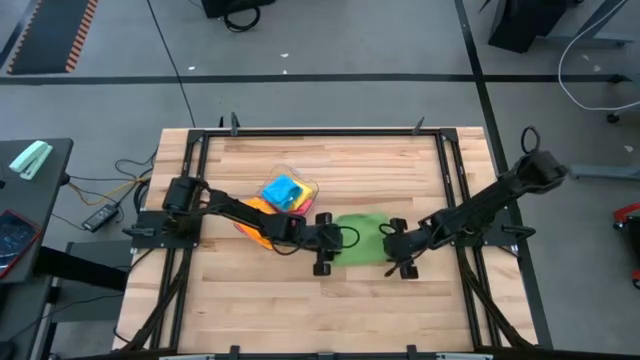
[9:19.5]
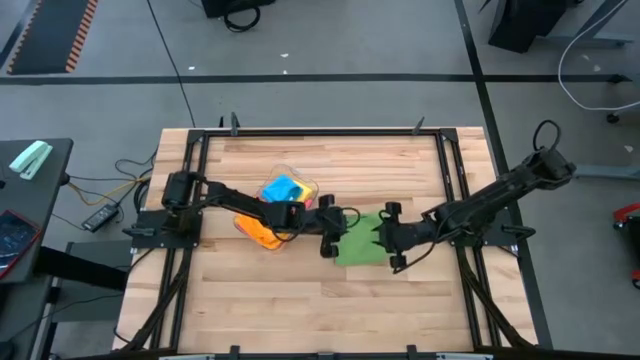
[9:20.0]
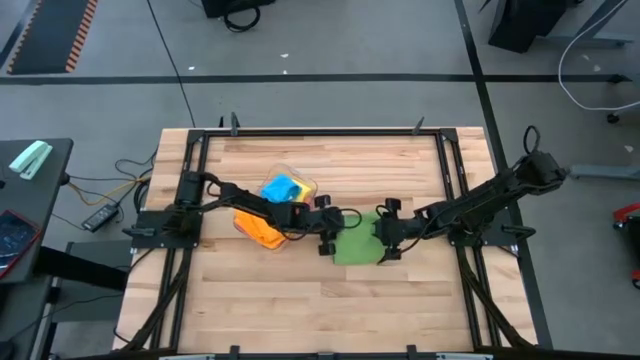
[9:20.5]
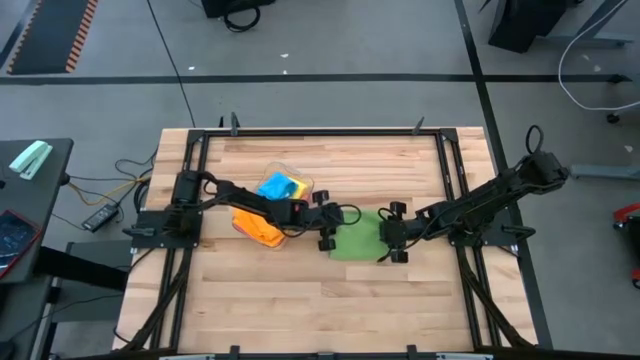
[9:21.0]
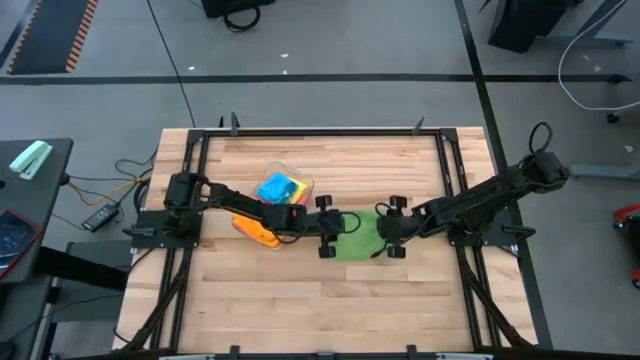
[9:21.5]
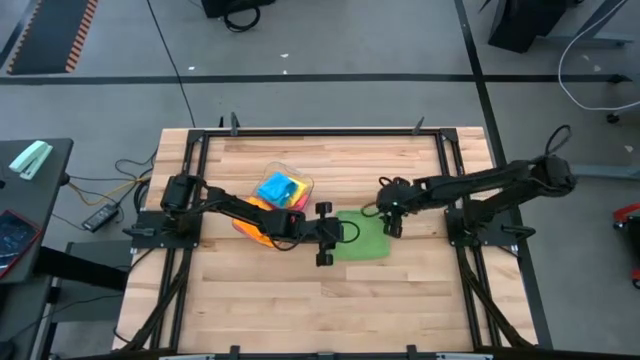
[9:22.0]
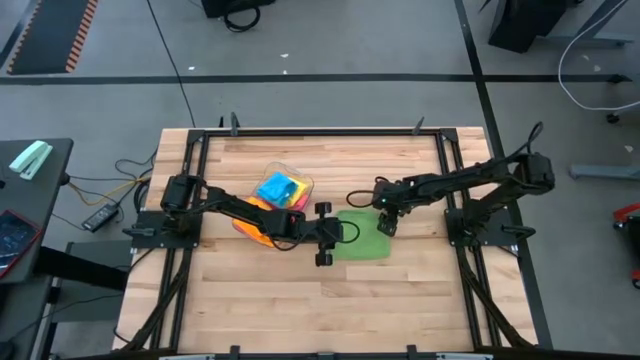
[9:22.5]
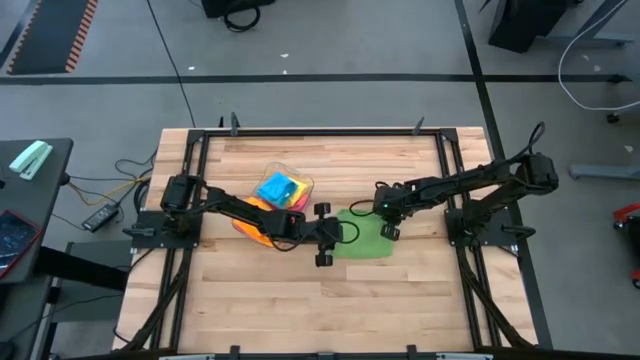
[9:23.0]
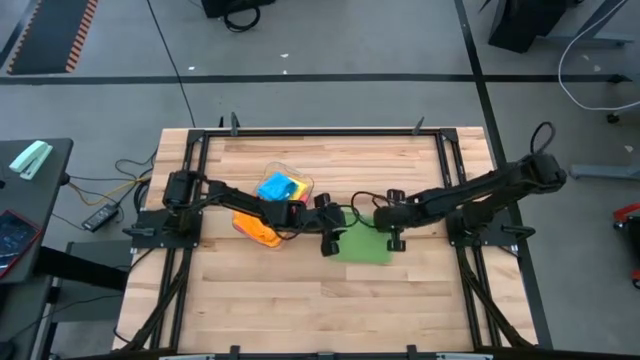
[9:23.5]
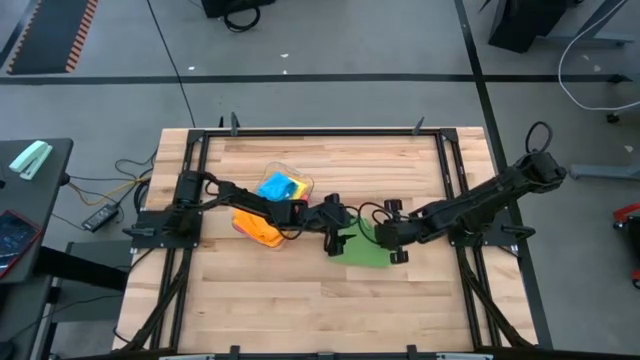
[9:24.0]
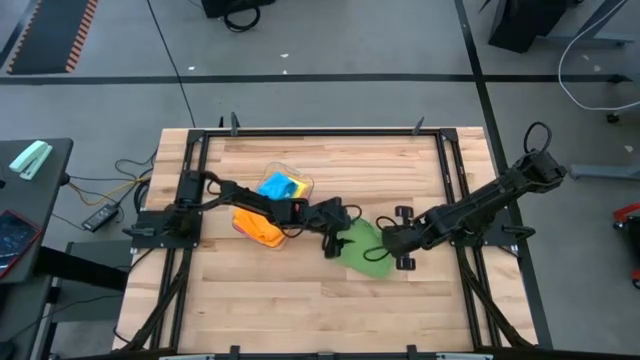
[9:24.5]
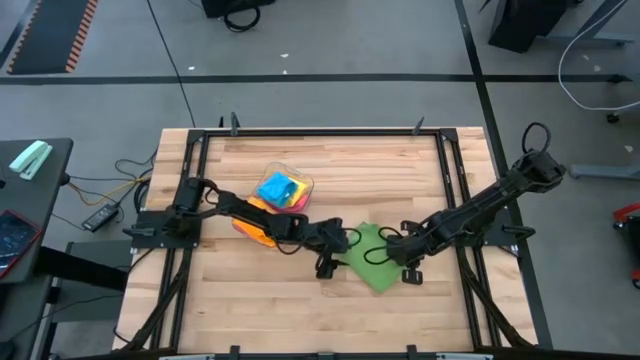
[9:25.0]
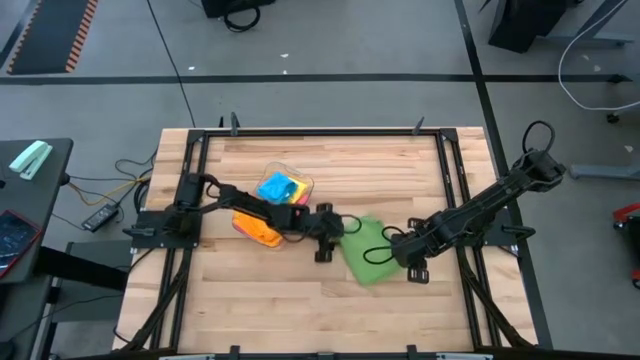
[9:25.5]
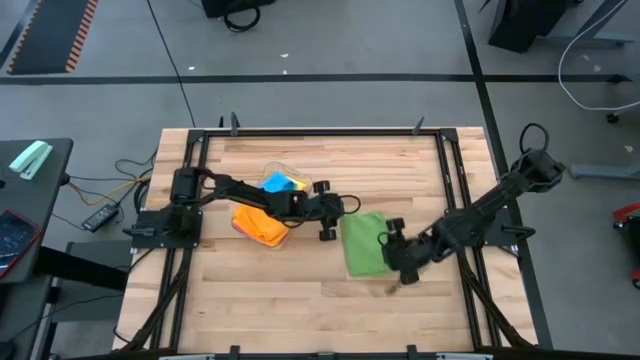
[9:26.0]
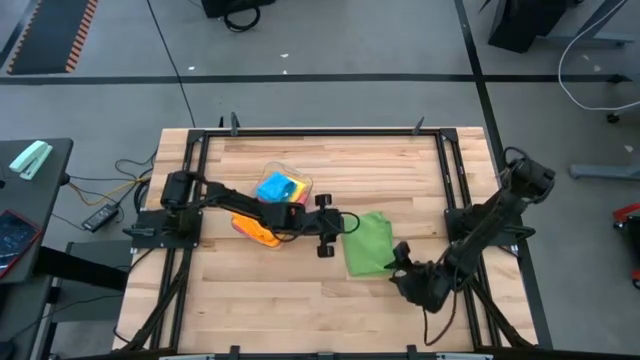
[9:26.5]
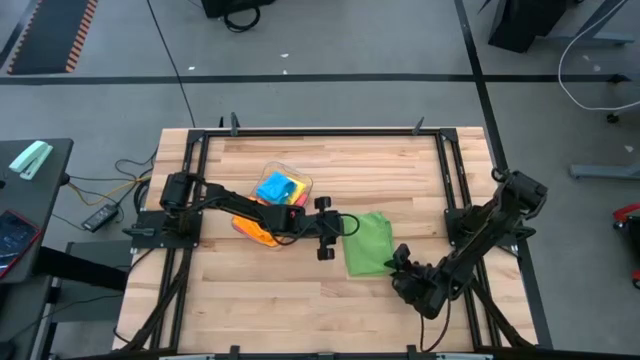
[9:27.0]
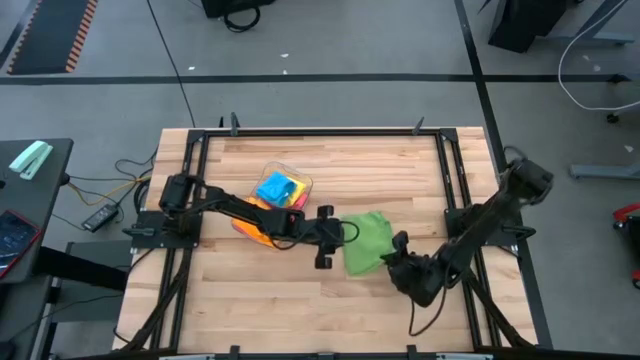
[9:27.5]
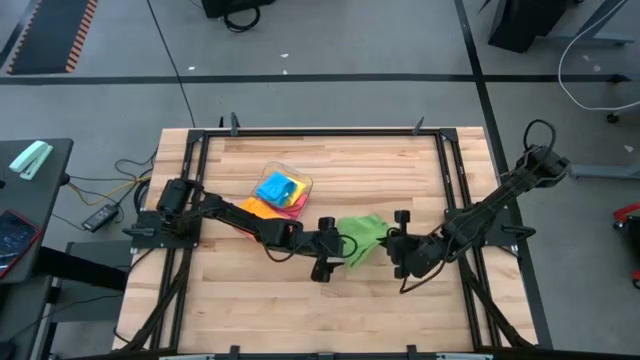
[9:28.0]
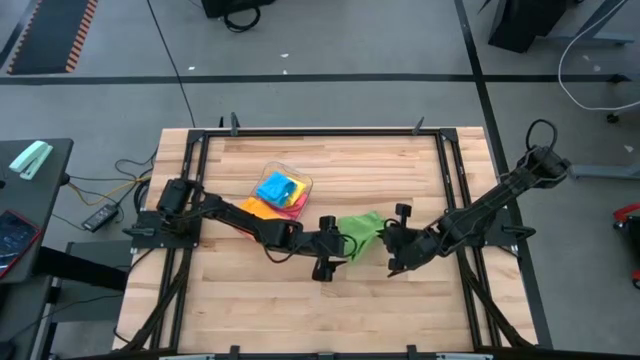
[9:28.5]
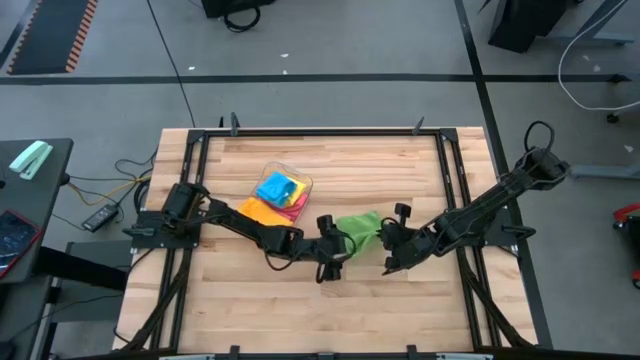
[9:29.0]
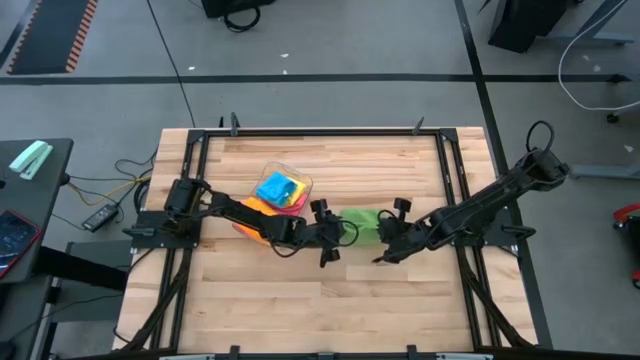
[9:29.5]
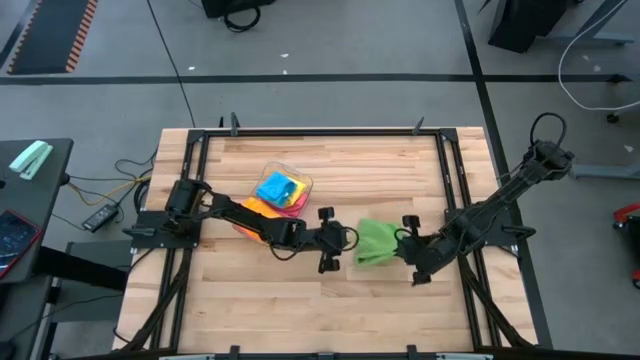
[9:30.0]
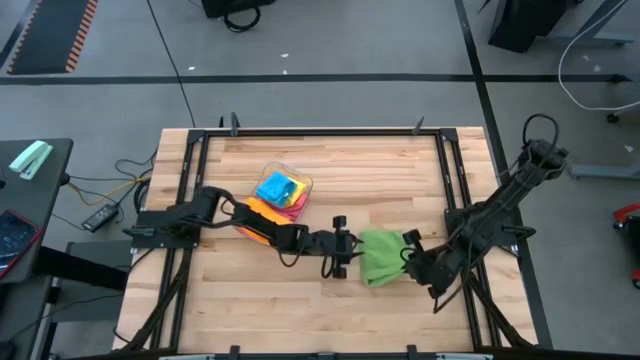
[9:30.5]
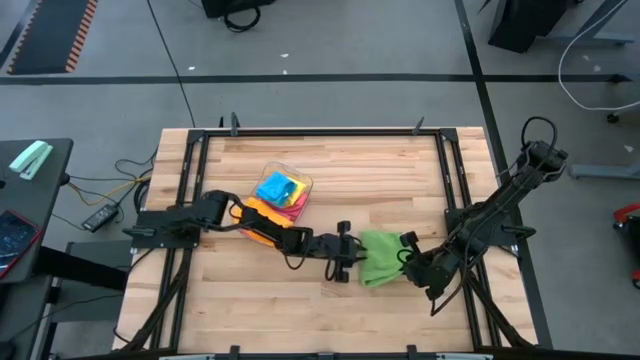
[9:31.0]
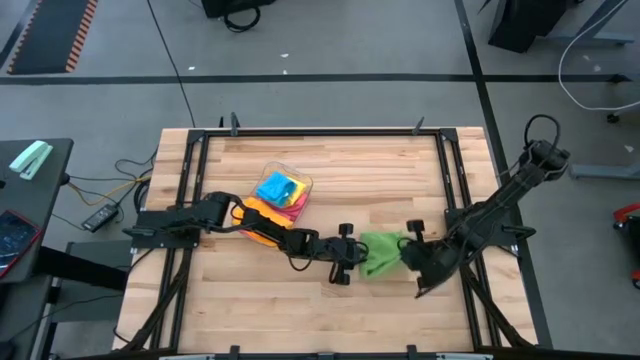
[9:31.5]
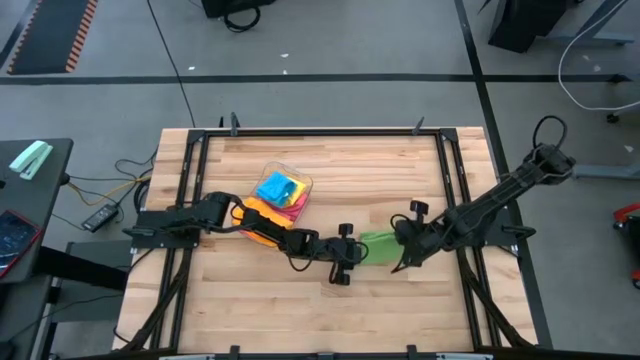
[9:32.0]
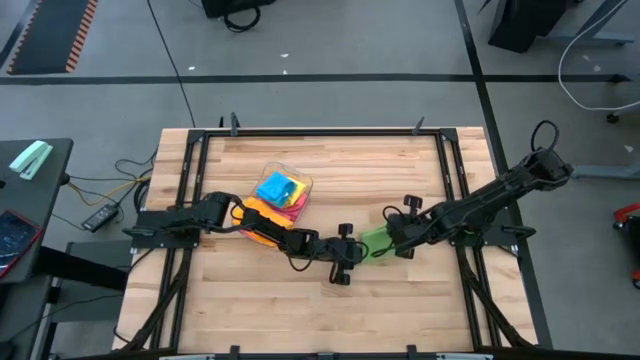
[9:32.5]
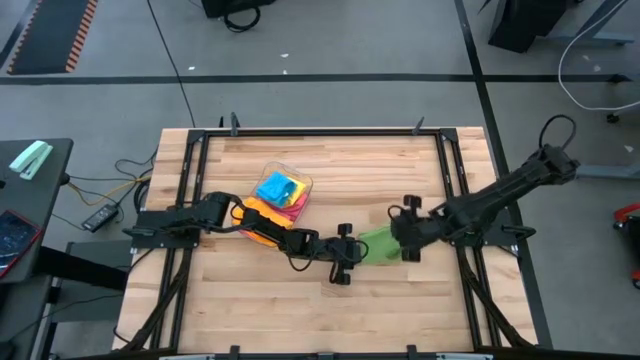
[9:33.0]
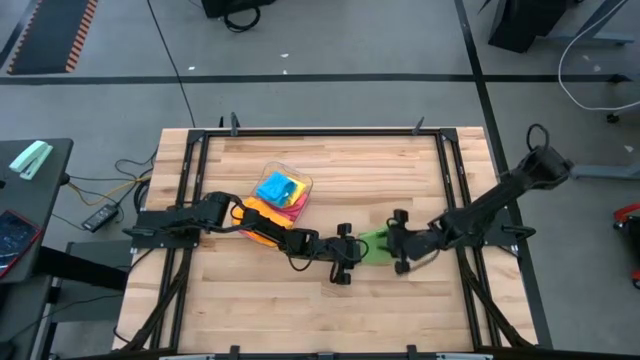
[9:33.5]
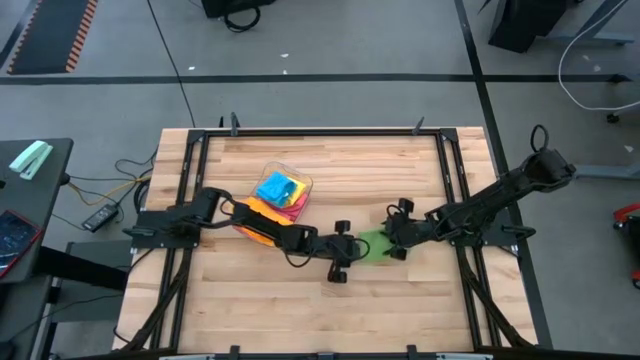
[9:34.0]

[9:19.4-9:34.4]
Task: Fold microfiber towels
Fold the green microfiber towel
